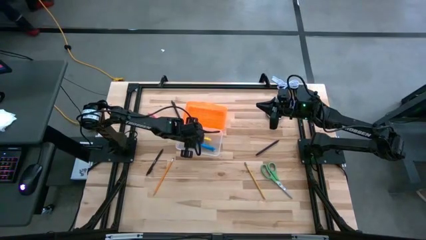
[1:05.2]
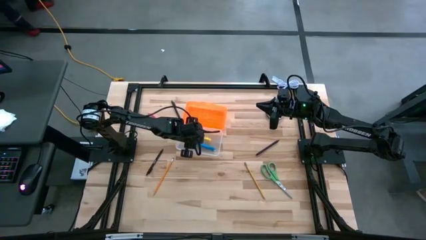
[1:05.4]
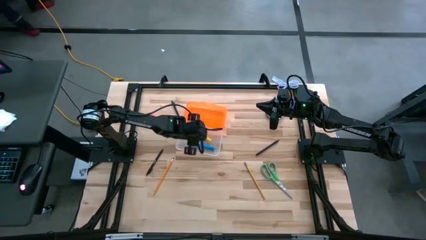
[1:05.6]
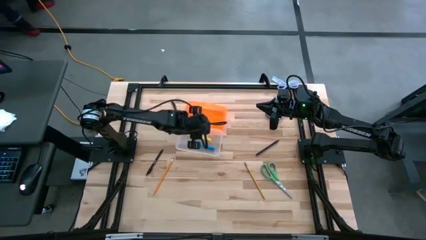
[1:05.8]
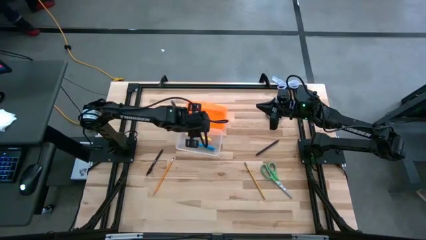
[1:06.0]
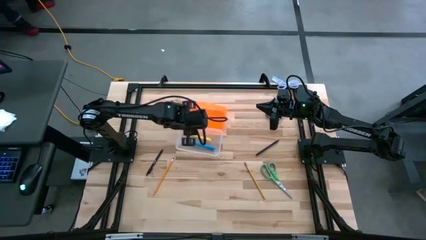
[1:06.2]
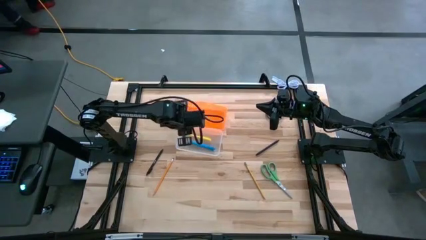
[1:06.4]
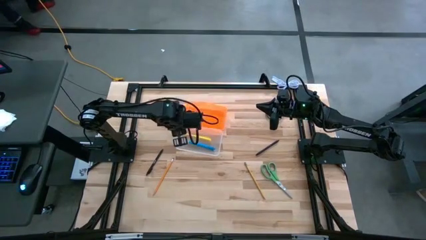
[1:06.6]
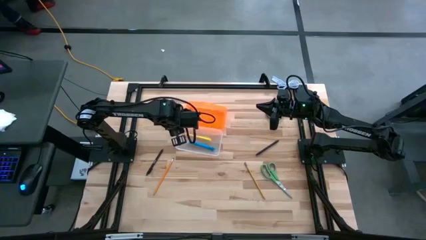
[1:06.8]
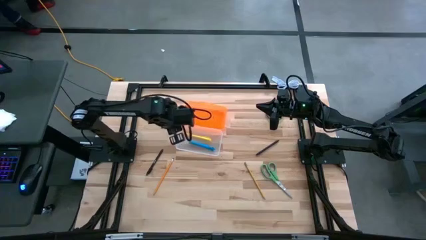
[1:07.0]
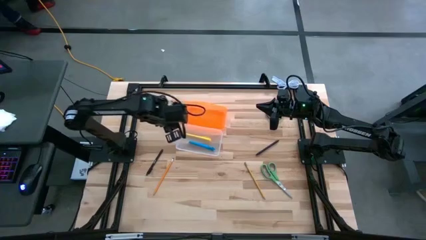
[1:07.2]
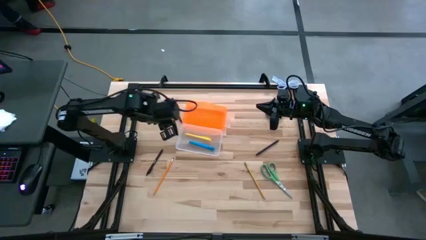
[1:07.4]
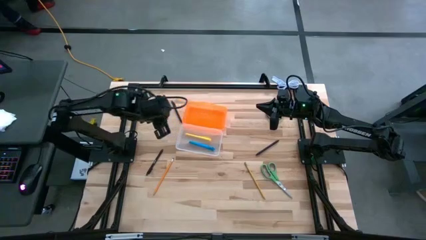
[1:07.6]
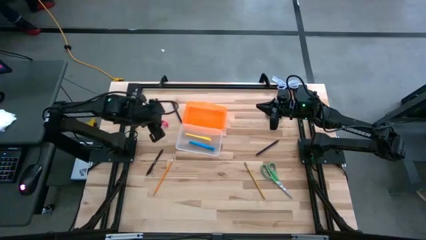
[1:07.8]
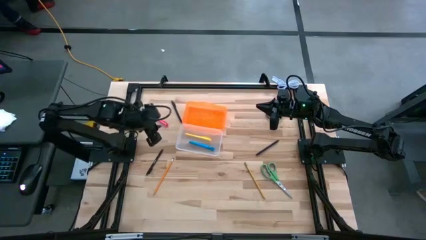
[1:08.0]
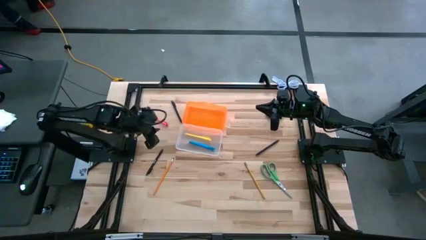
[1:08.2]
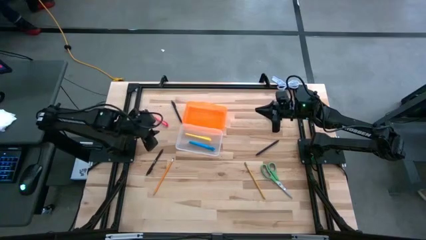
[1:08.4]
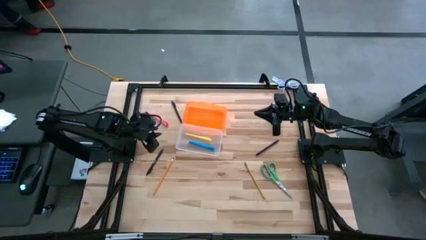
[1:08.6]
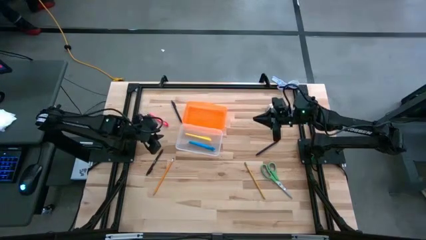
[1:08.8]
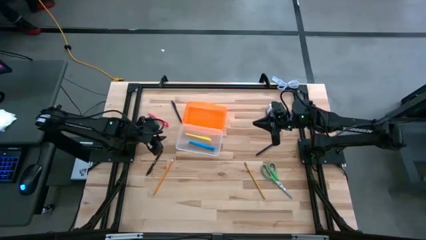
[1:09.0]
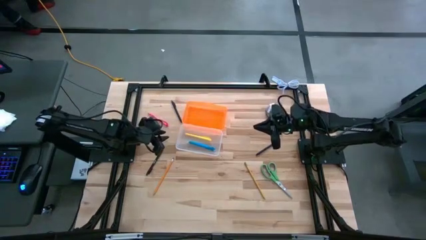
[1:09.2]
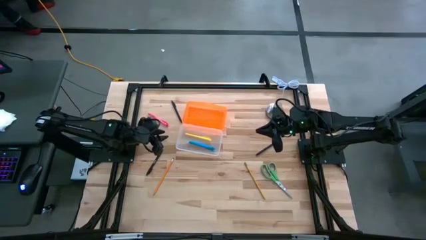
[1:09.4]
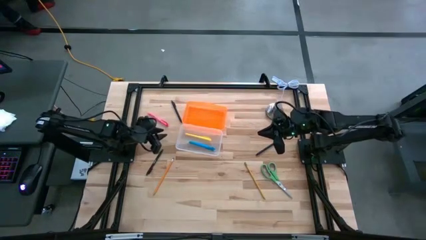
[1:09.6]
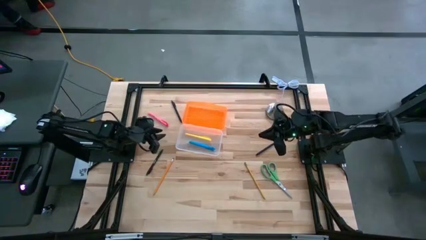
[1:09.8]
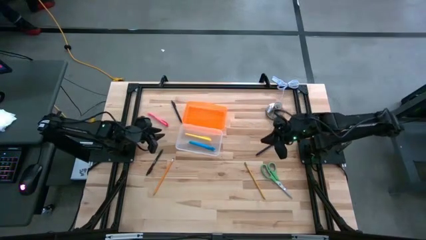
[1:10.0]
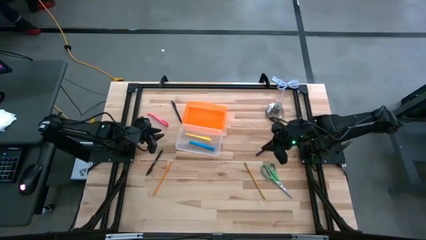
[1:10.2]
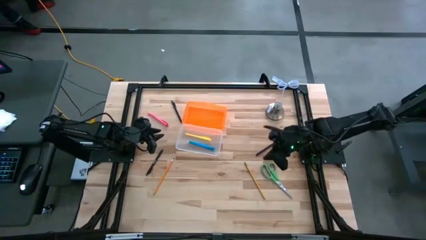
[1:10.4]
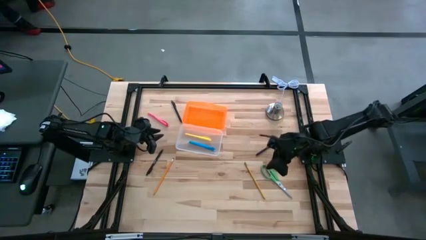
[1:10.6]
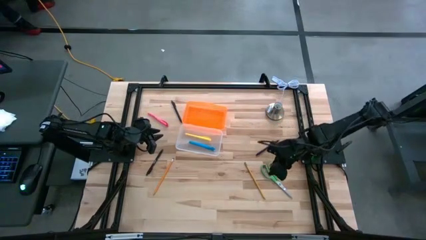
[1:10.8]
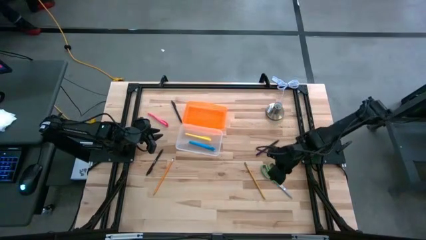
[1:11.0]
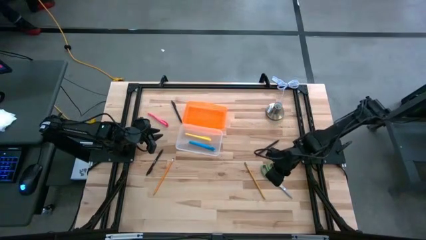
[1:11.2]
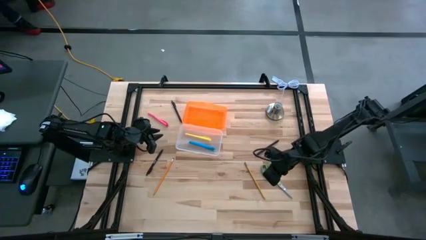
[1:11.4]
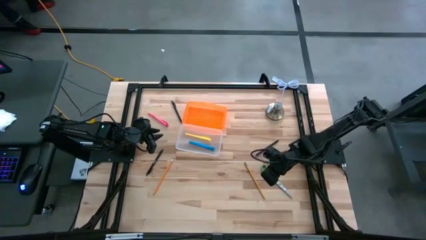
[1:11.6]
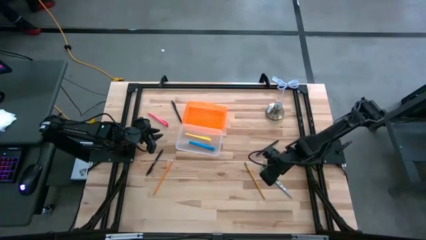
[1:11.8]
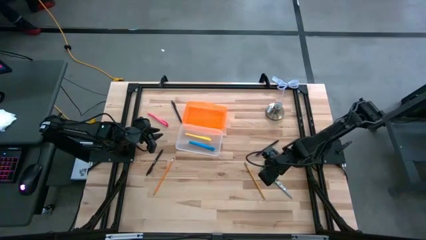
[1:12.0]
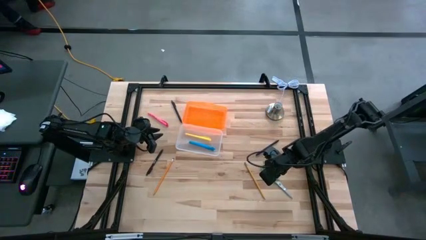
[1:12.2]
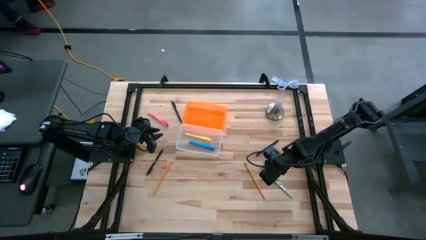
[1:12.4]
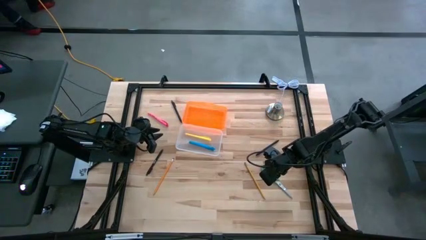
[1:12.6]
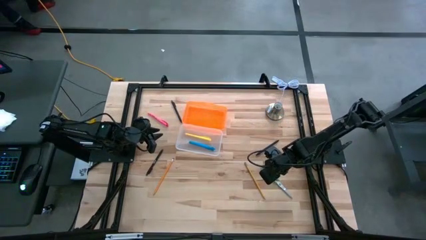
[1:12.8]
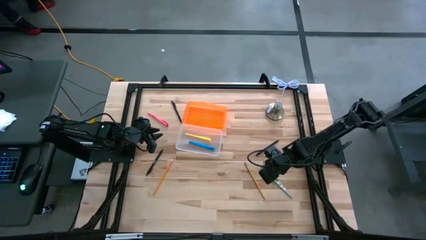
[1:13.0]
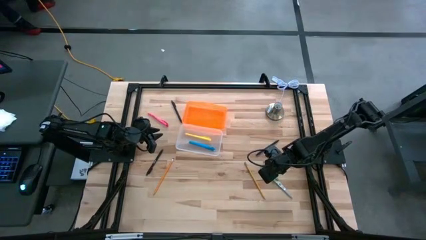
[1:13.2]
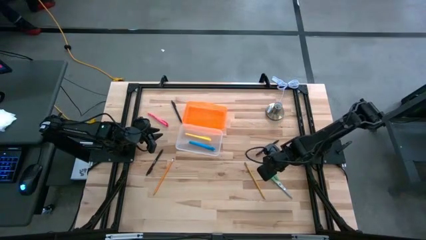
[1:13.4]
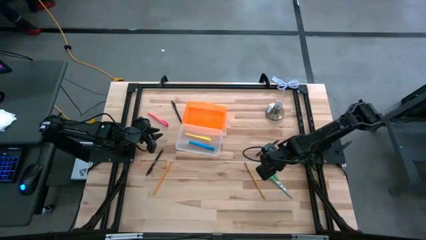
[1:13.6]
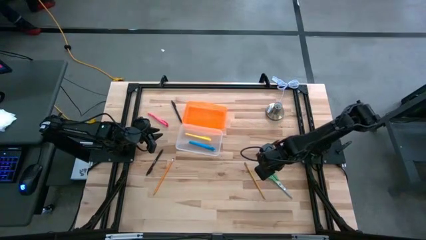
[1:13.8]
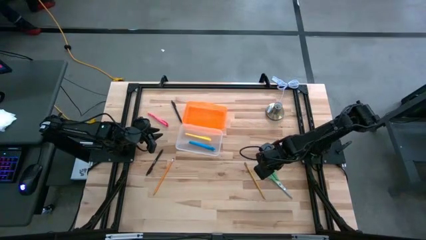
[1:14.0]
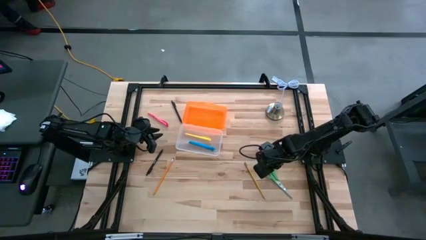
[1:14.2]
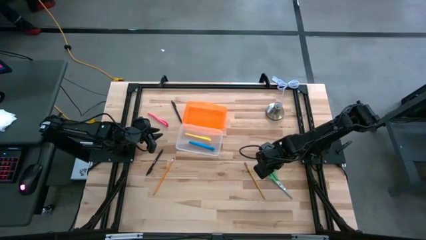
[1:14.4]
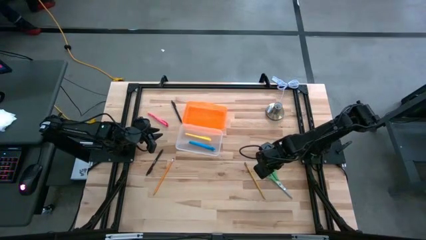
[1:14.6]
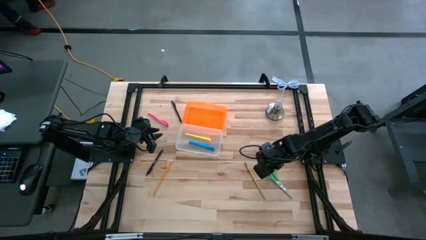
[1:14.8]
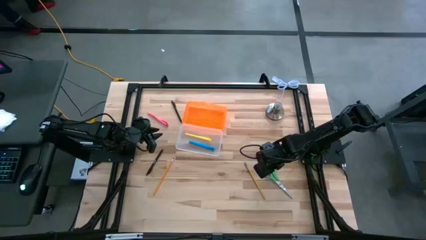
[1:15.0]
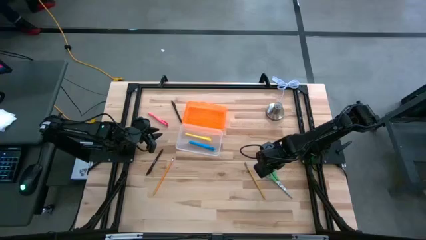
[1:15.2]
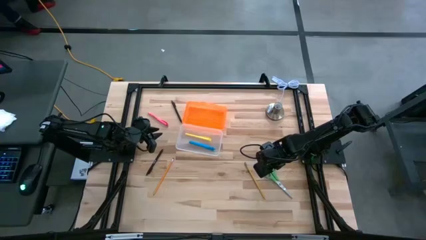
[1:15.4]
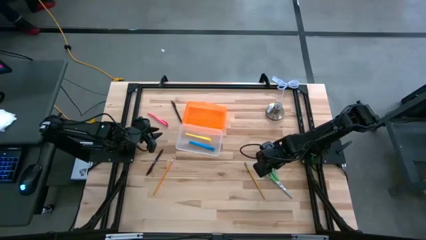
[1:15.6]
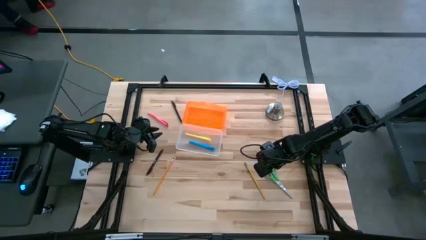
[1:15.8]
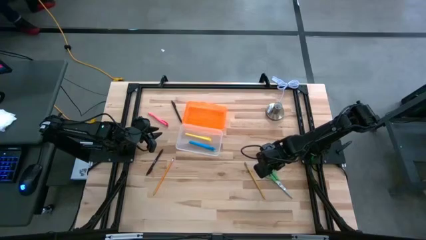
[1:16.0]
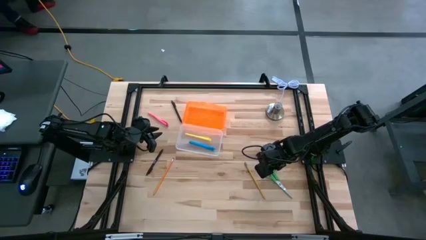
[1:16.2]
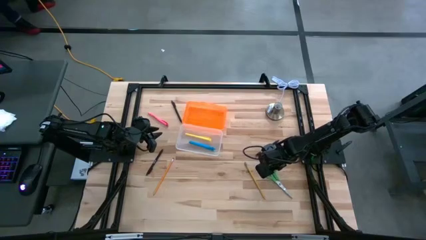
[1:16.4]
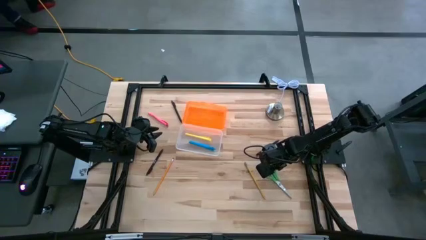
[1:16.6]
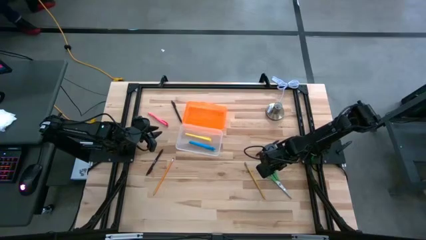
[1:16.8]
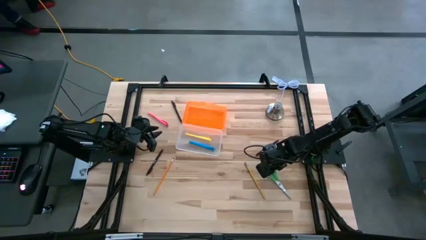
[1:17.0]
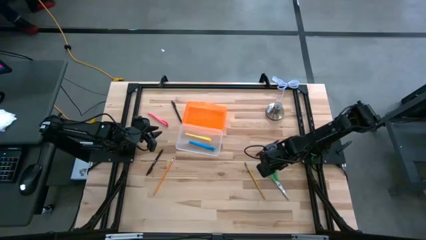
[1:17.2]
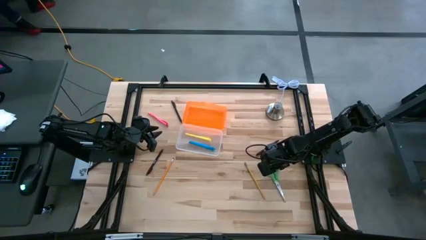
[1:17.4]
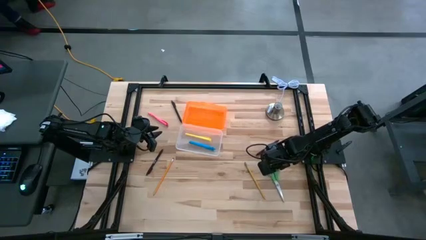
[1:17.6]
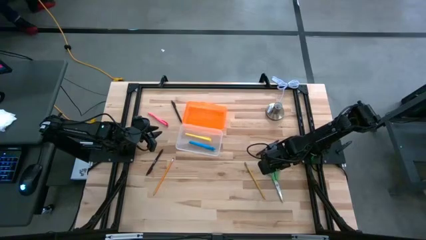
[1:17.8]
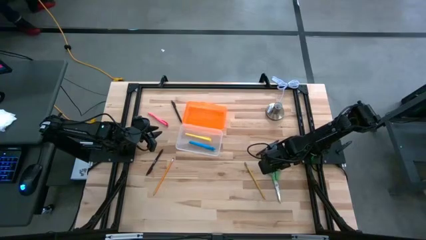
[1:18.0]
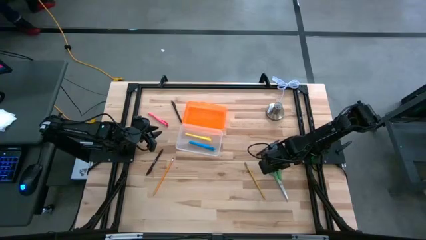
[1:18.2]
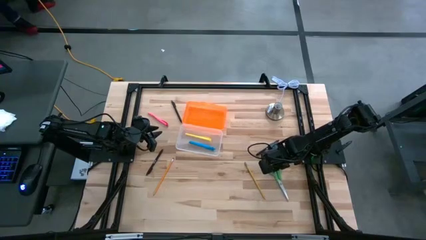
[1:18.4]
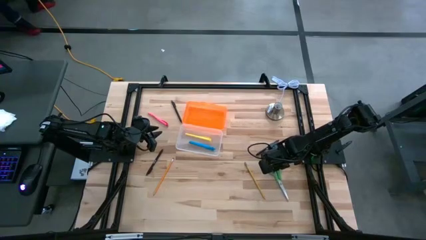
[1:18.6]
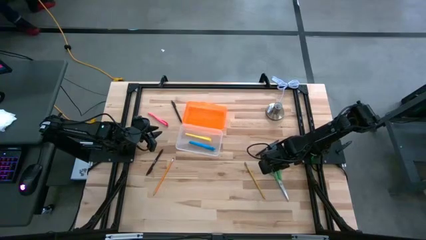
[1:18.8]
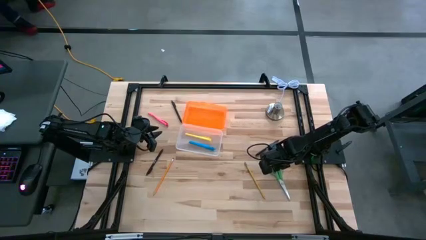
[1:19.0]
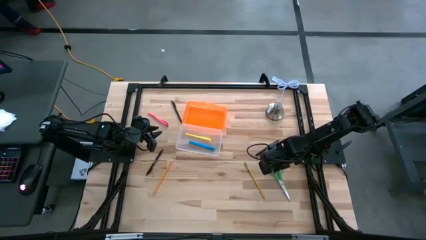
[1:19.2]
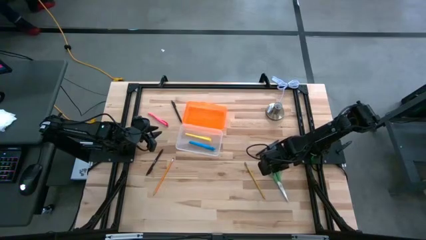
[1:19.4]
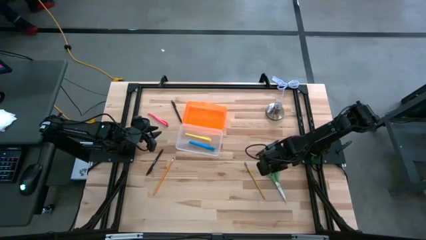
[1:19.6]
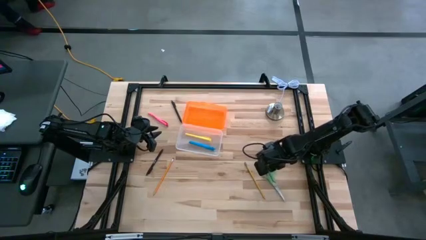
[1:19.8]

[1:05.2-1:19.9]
Task: Pick & place school supplies into a supply box
Put the green scissors into the orange supply box
